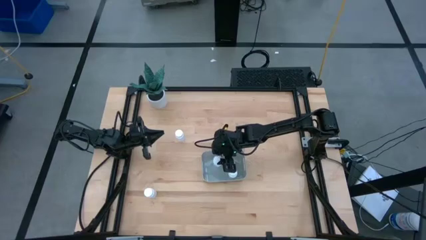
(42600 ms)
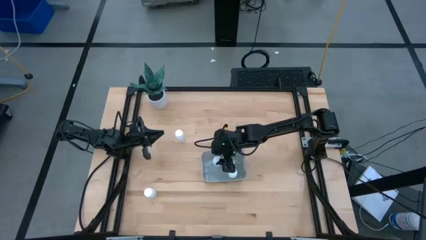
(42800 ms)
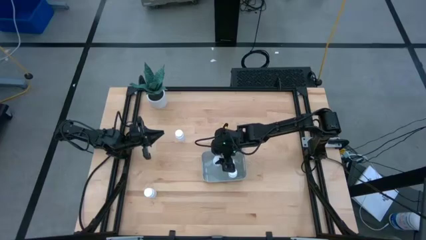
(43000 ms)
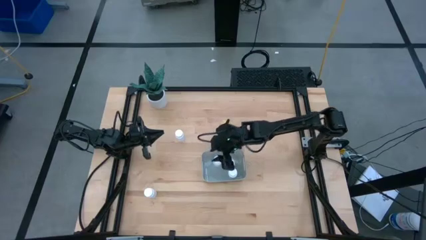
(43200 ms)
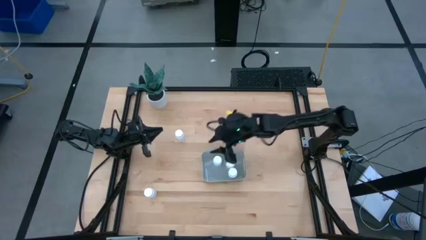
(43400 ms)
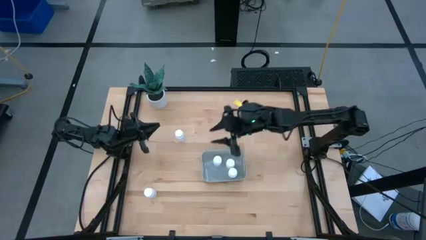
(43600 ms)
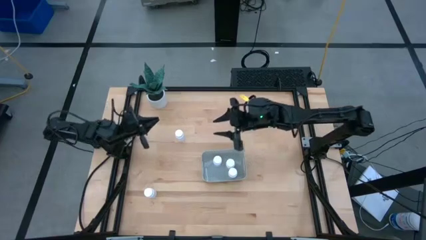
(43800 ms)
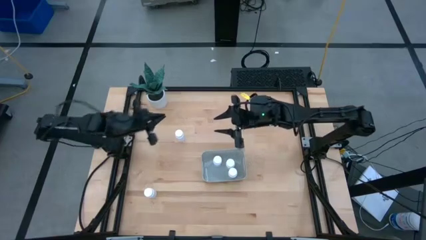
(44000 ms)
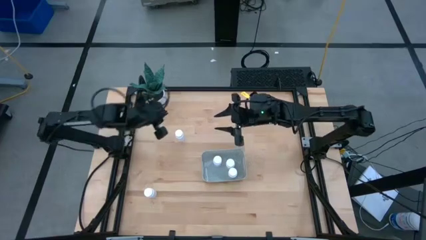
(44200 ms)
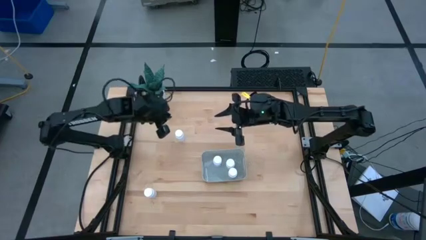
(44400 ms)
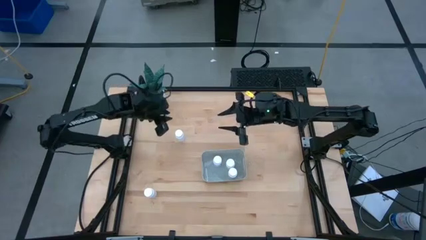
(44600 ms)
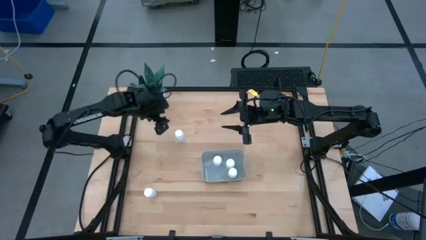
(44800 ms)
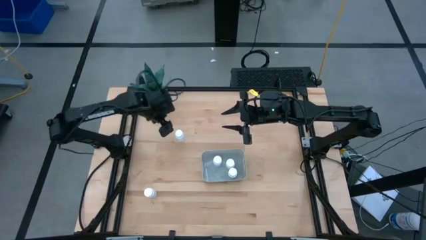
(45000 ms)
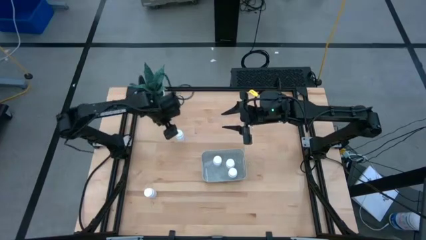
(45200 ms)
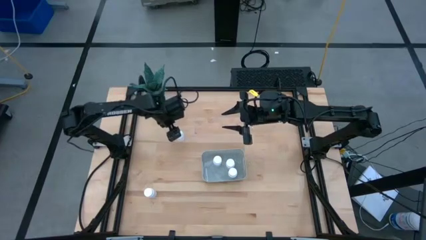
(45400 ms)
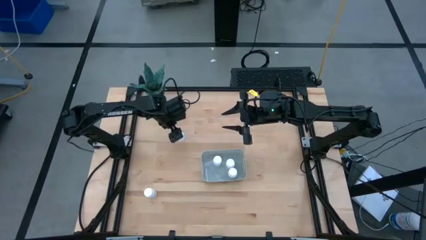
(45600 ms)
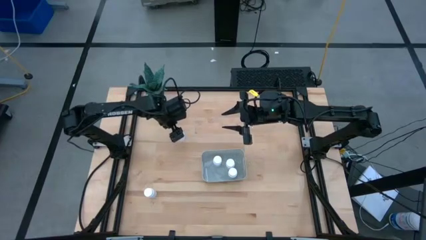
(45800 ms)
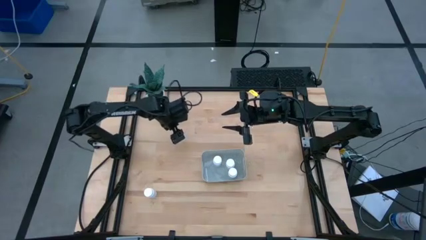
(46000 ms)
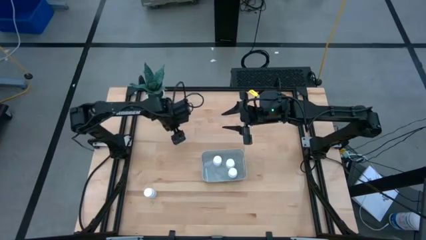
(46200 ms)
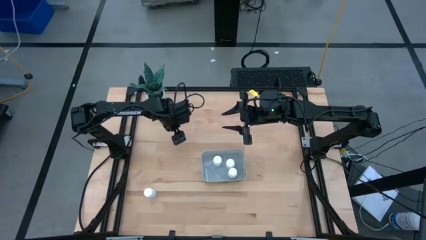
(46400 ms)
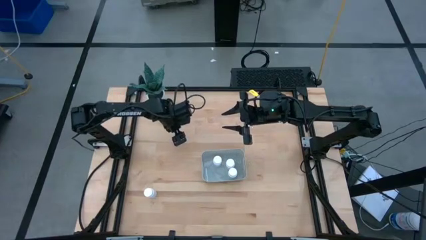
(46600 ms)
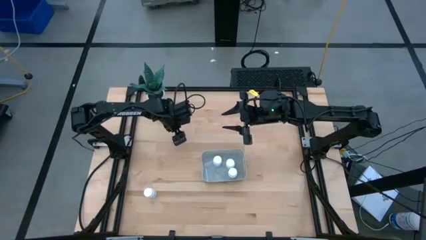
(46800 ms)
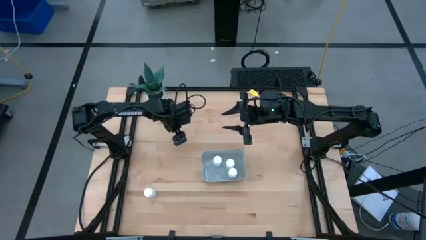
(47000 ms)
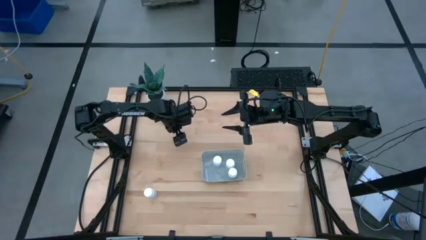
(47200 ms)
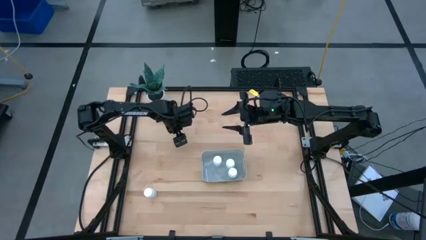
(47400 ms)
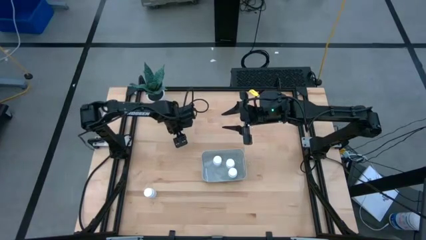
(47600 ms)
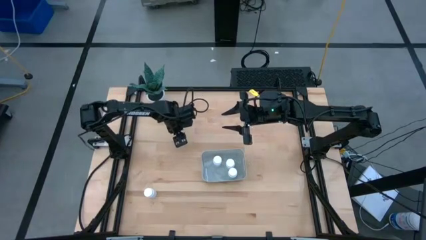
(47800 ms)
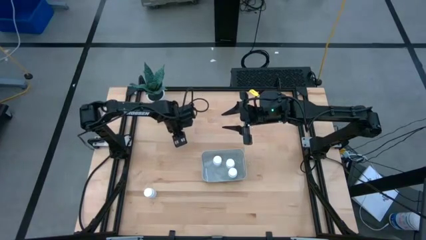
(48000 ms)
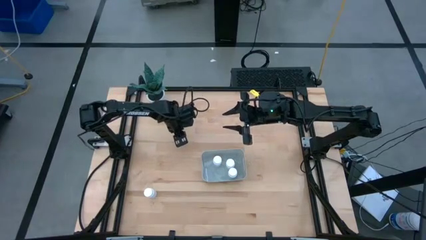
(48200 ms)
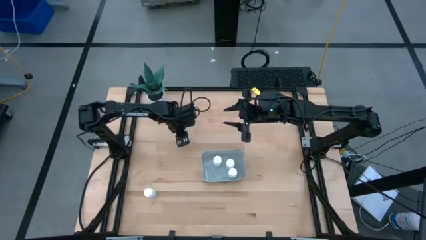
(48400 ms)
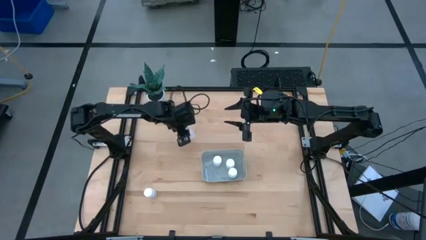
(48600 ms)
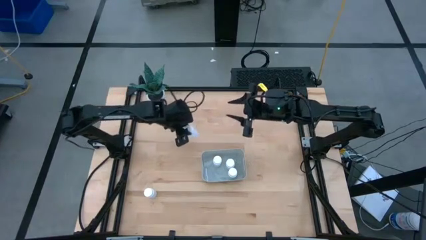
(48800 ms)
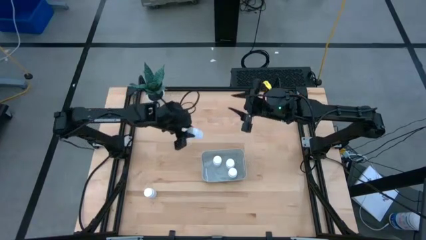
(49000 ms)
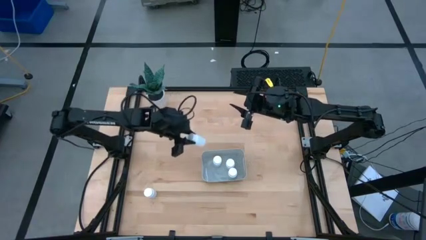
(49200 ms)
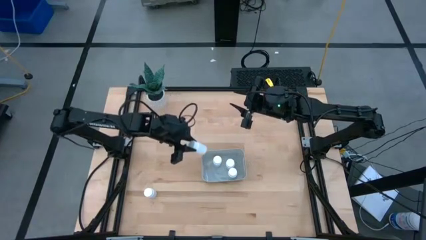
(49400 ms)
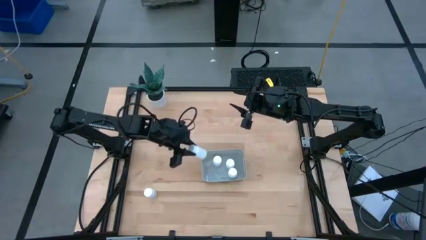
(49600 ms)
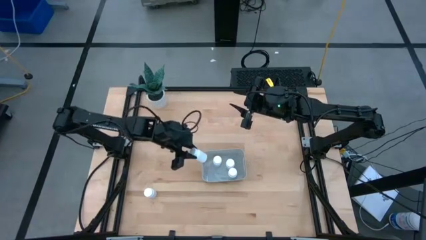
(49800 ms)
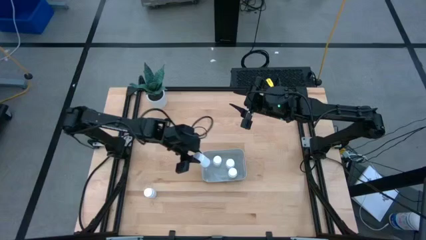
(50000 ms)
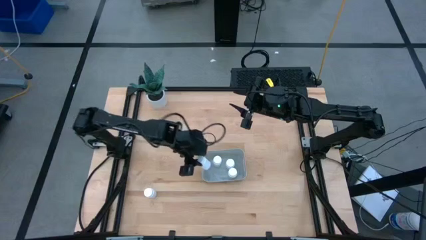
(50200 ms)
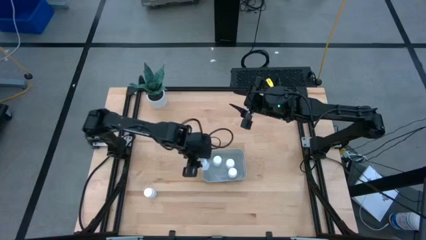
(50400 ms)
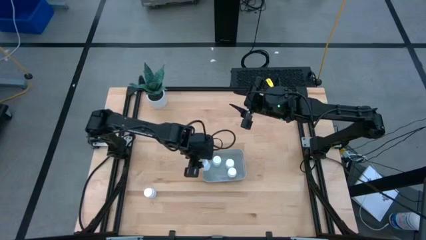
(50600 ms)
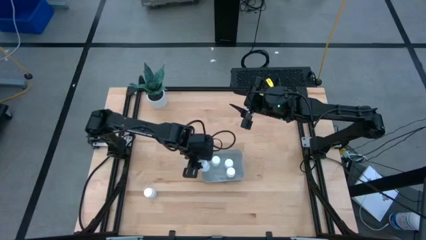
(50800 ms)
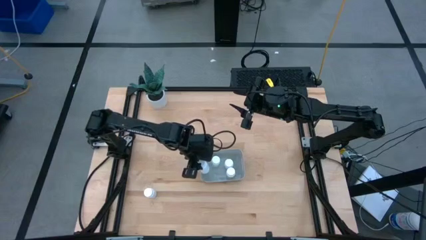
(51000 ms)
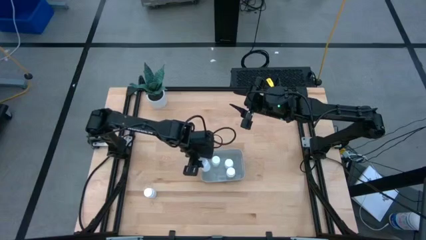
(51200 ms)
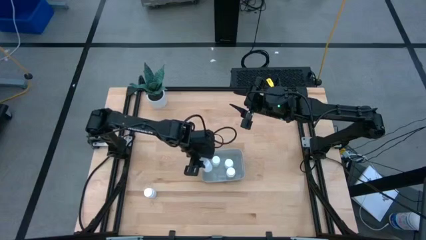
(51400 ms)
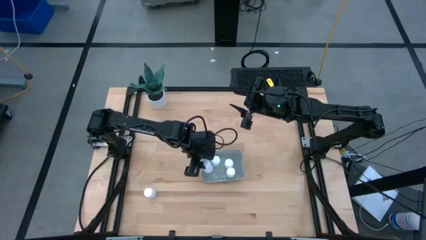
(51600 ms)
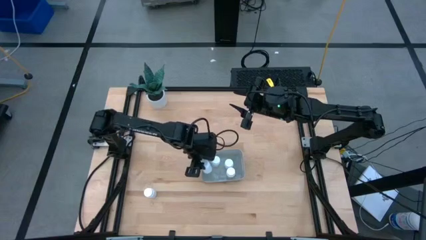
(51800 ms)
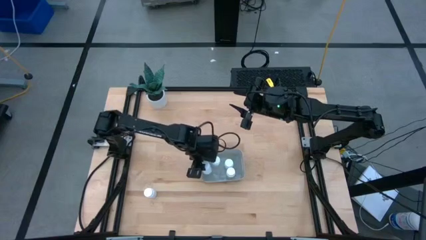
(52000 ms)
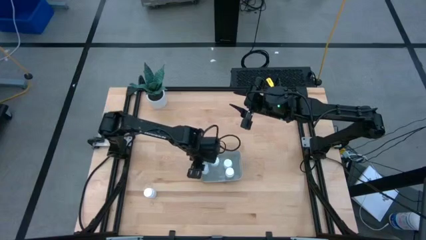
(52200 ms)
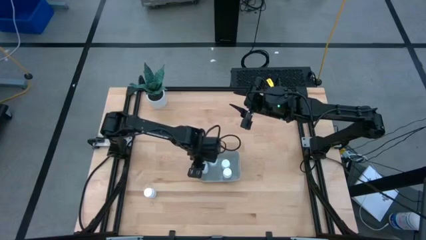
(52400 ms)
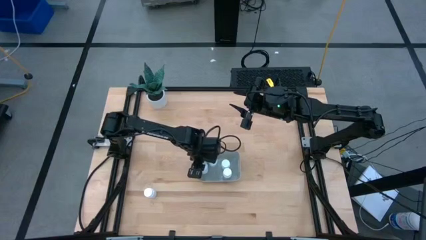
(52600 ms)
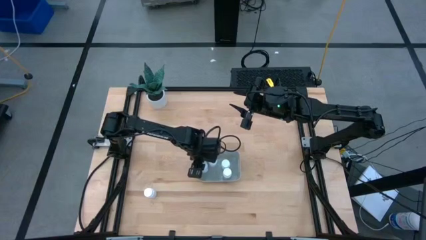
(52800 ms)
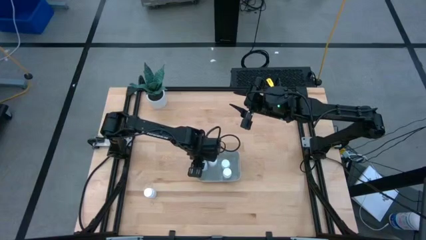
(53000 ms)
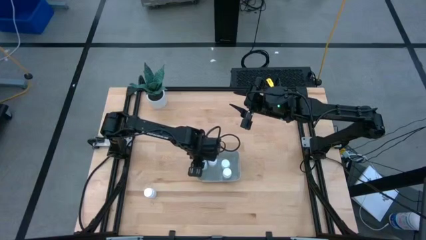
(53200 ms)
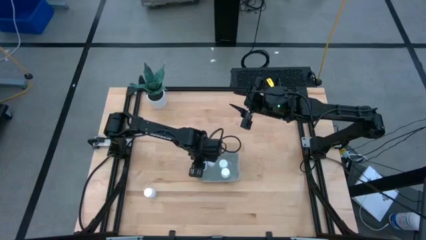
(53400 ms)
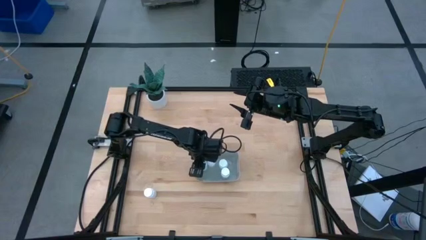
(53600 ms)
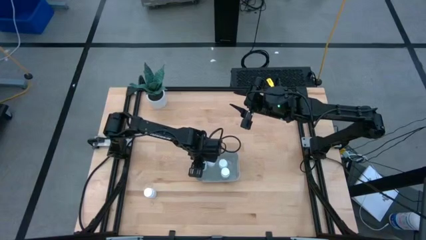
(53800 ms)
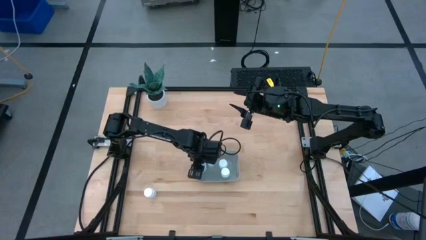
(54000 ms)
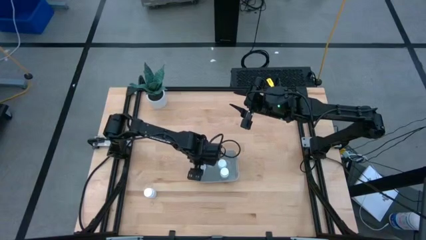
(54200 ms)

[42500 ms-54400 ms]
Task: Pick and place pill bottles into a basket
Put the white pill bottle into the gray bin

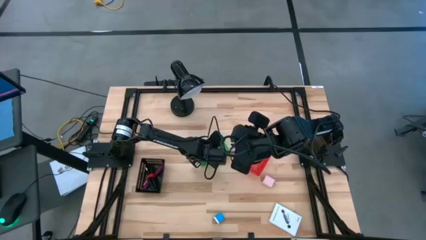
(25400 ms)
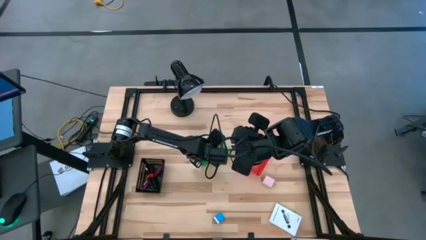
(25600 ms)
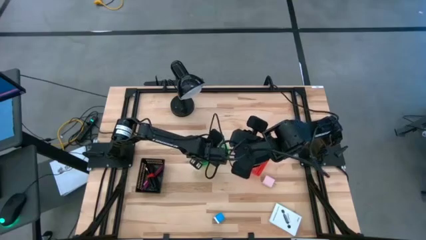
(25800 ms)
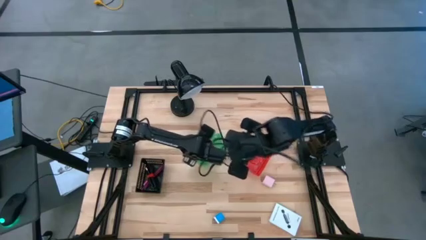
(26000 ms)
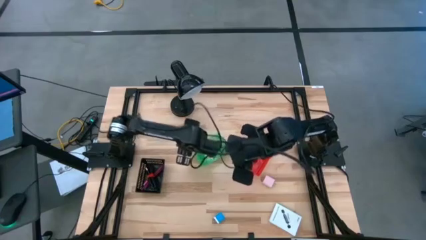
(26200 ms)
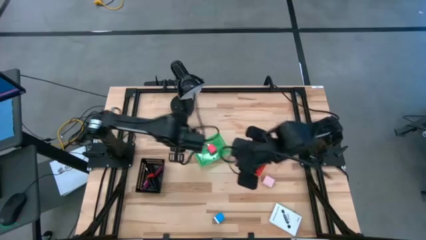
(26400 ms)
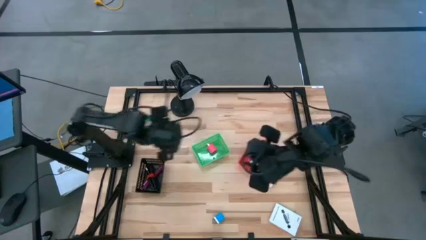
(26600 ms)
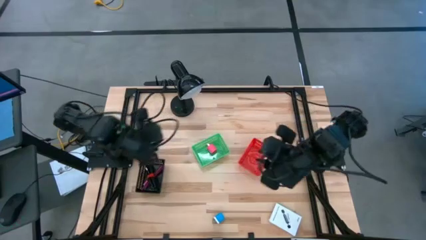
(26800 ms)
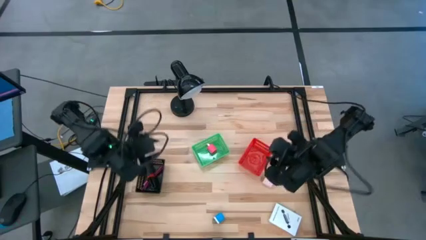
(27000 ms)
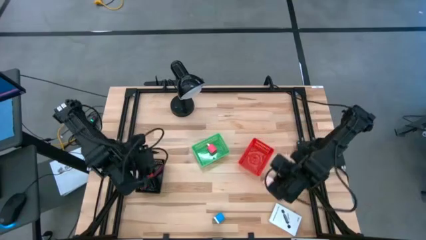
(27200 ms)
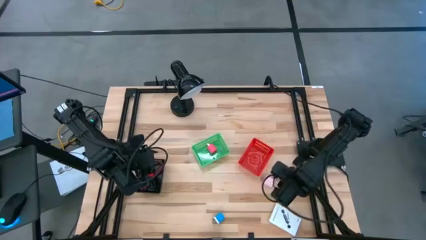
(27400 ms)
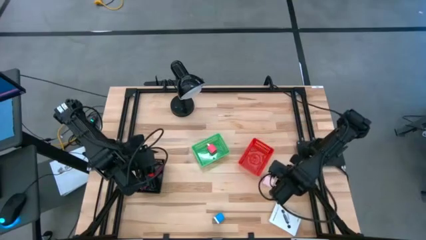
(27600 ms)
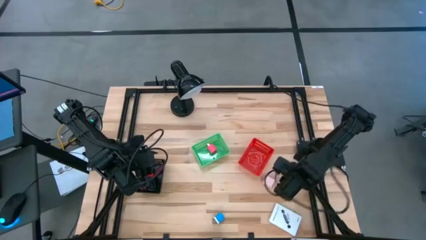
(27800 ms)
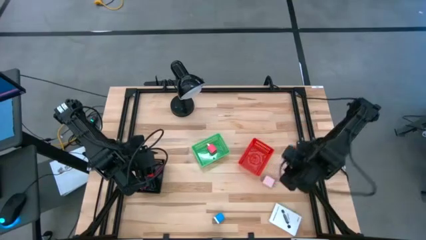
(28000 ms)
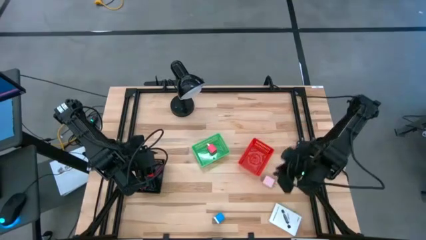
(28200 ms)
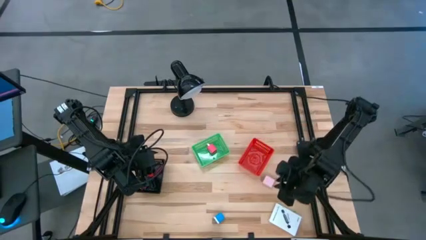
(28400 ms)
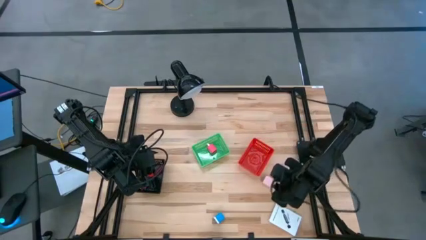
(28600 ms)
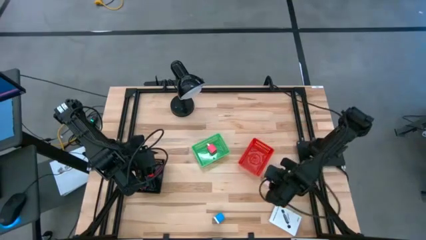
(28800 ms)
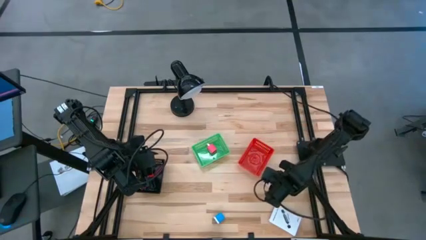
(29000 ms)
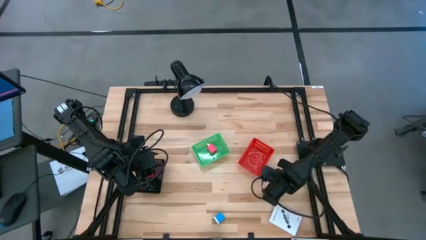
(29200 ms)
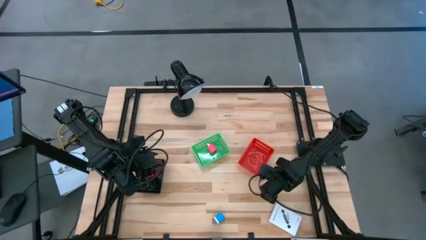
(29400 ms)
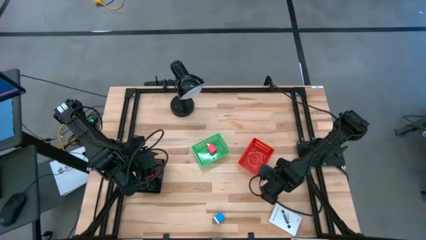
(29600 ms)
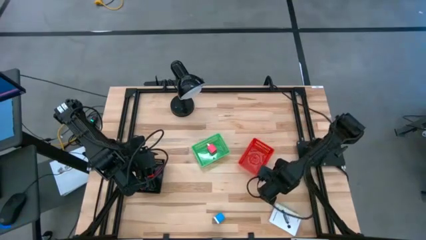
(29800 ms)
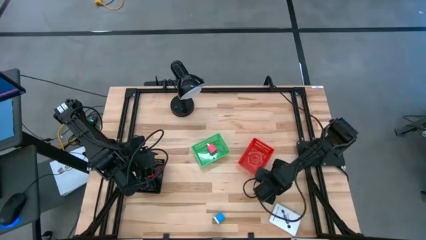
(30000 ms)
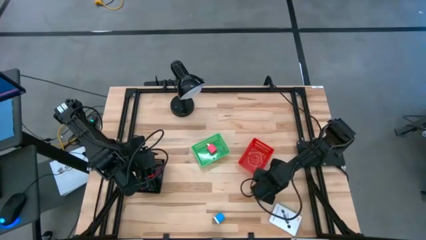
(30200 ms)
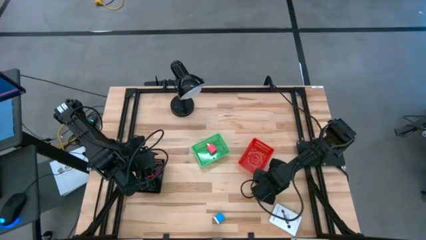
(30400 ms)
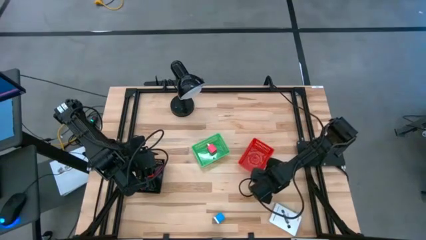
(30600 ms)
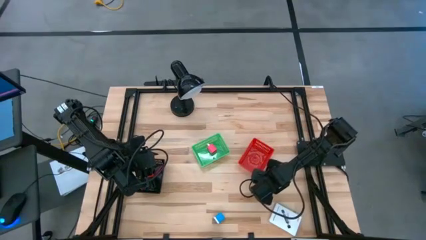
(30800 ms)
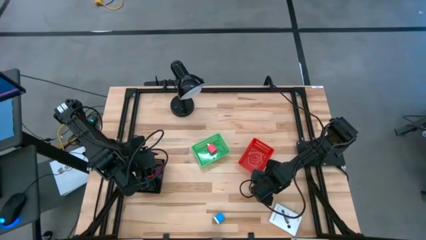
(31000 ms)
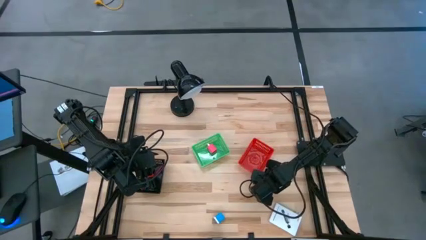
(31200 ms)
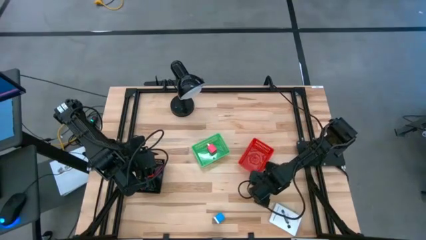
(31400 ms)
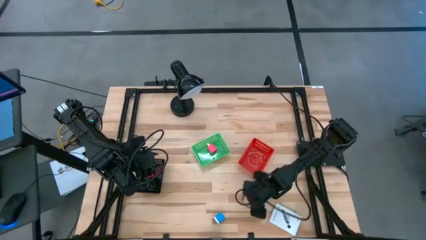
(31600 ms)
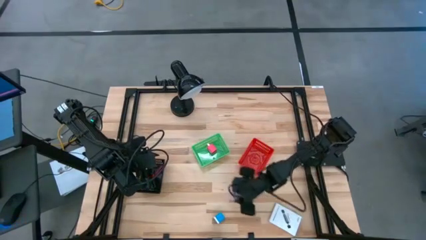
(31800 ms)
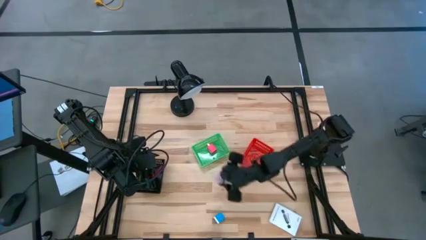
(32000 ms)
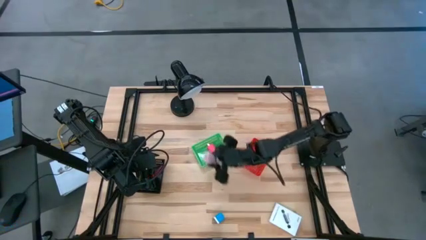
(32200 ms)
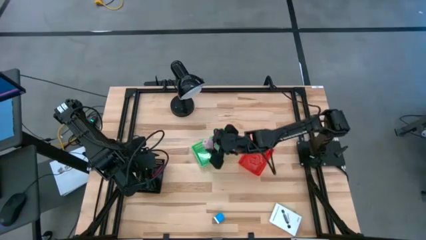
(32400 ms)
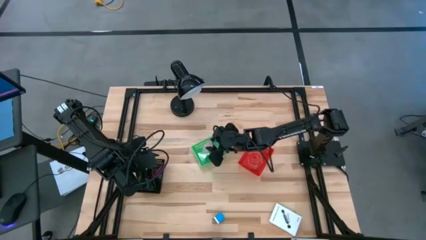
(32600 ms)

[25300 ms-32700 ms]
Task: Pick and place items into bin
Put the white charger adapter into the green bin
